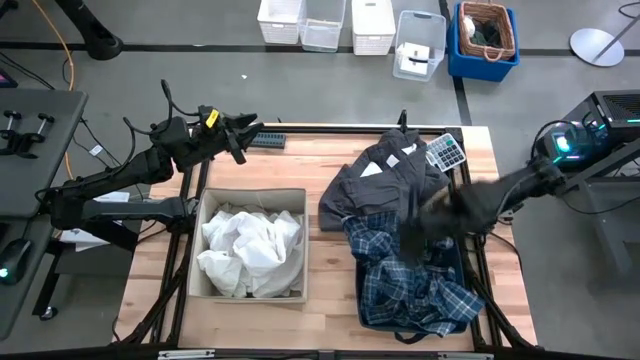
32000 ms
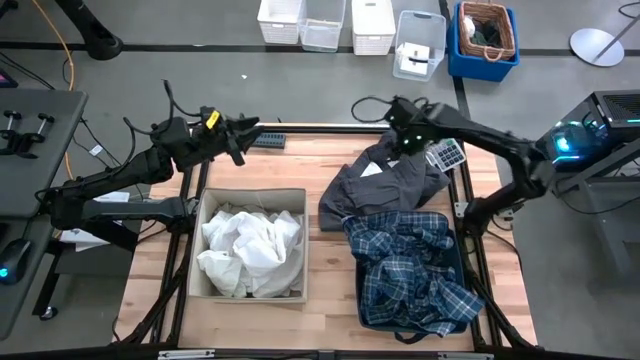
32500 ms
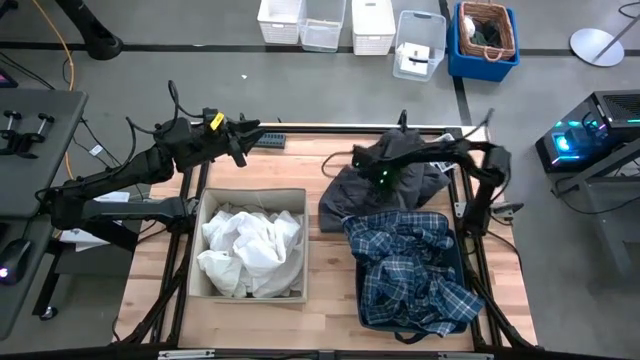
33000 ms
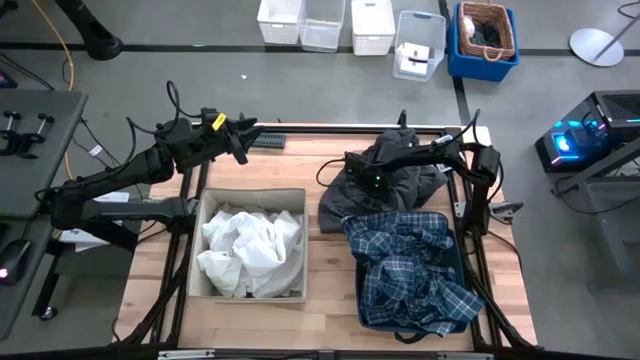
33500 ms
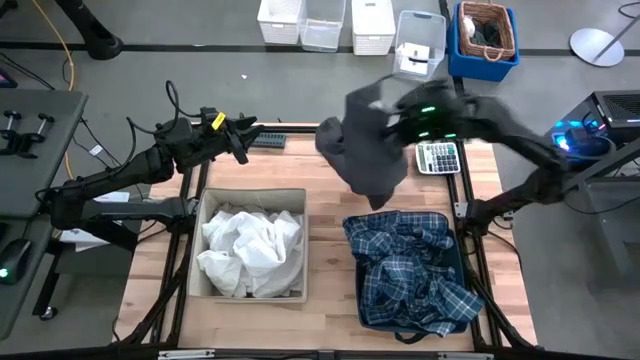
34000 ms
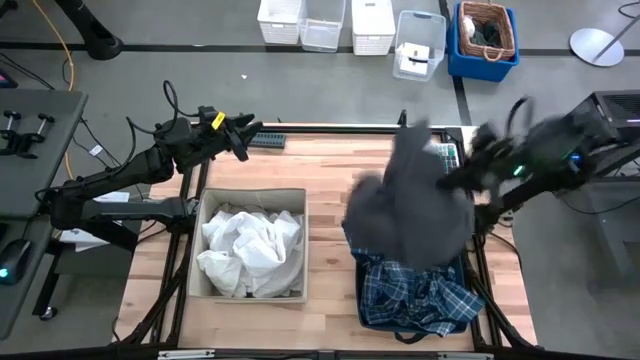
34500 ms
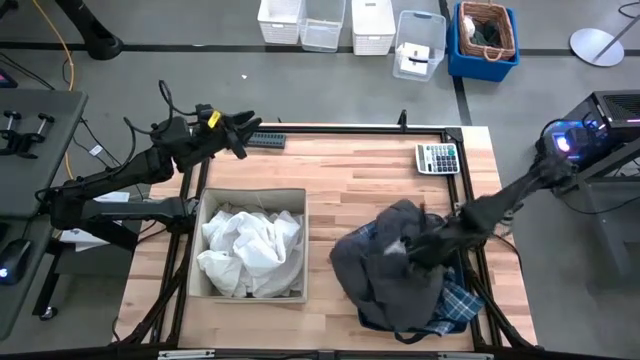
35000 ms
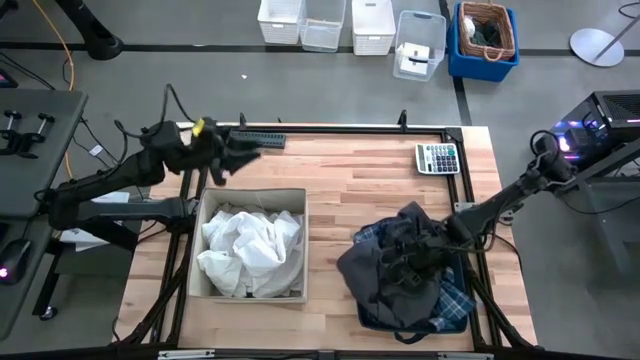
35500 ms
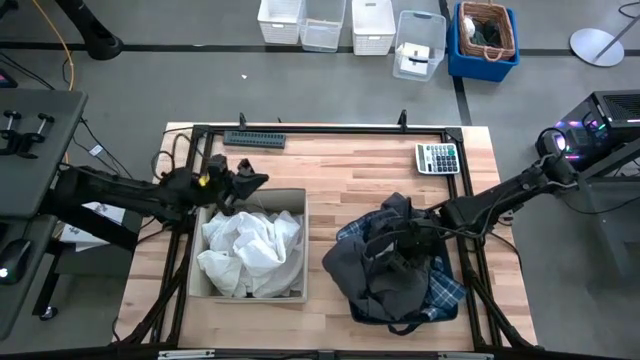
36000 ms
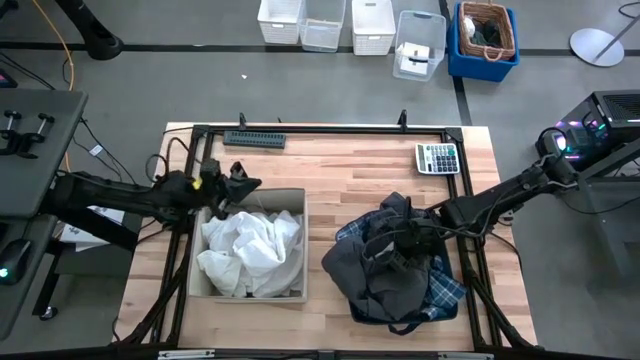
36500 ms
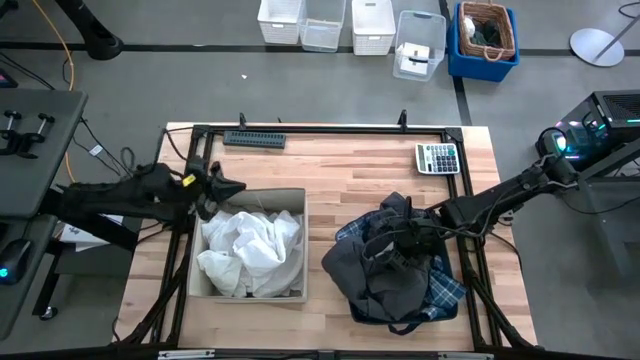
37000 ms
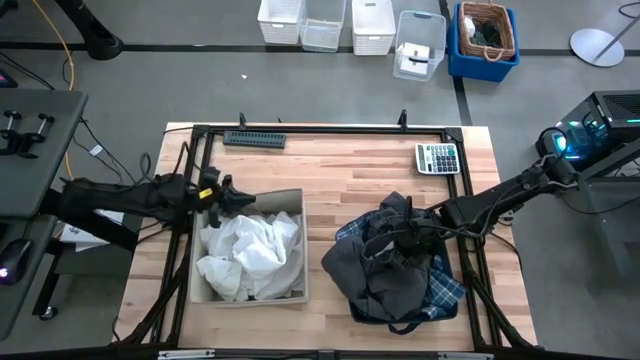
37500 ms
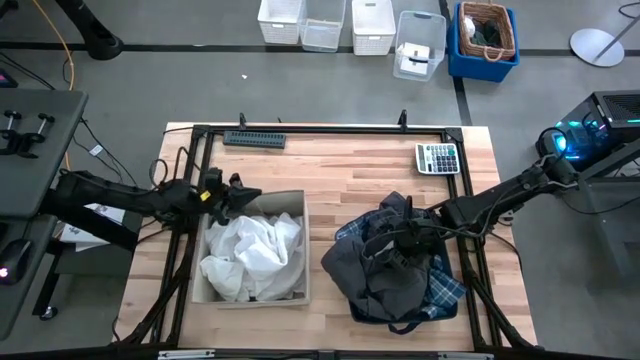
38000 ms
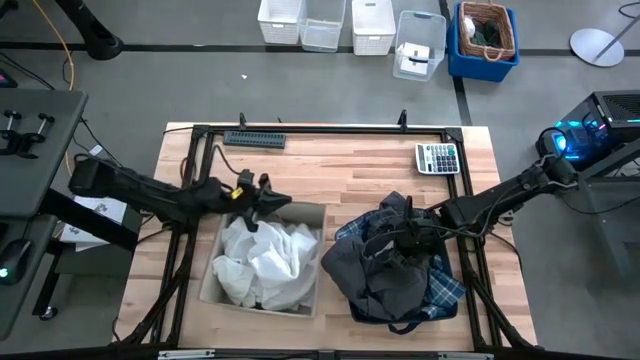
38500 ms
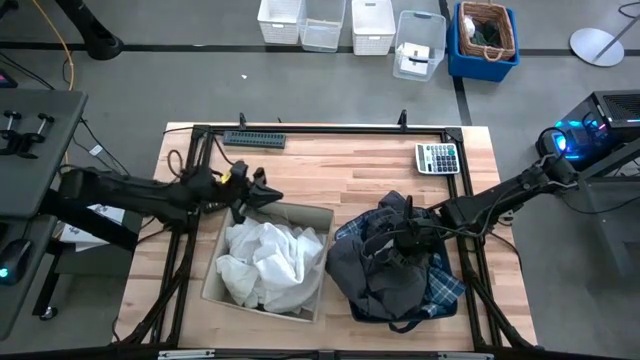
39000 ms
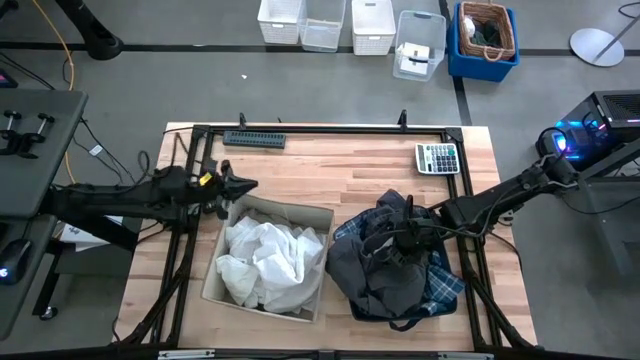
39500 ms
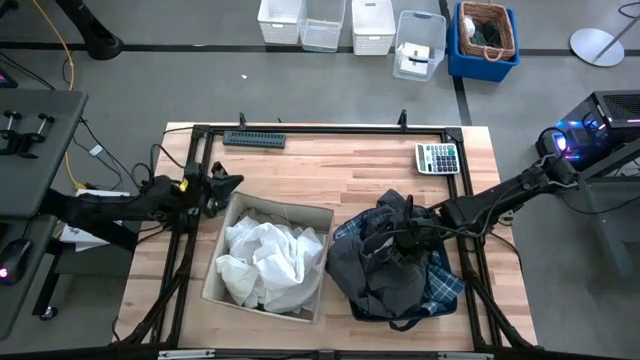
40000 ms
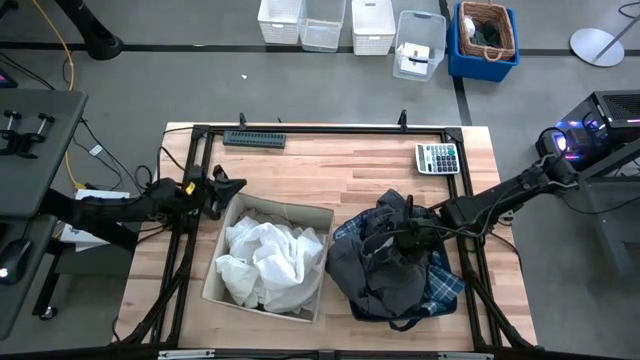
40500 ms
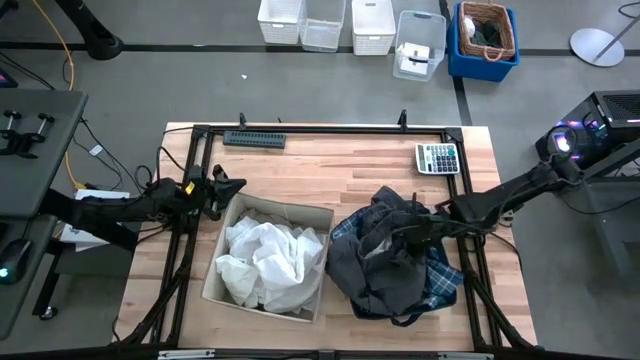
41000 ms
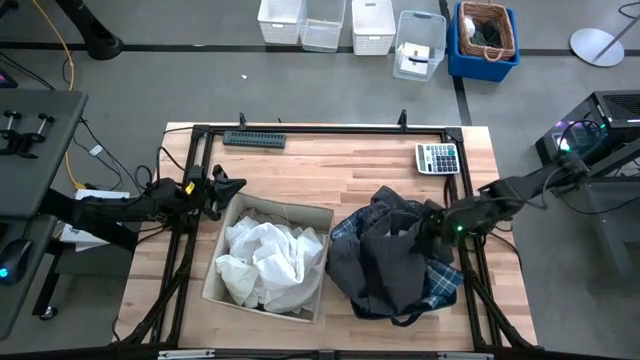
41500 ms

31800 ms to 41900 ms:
Task: Sort clothes
Put the black shorts into the blue laundry bin

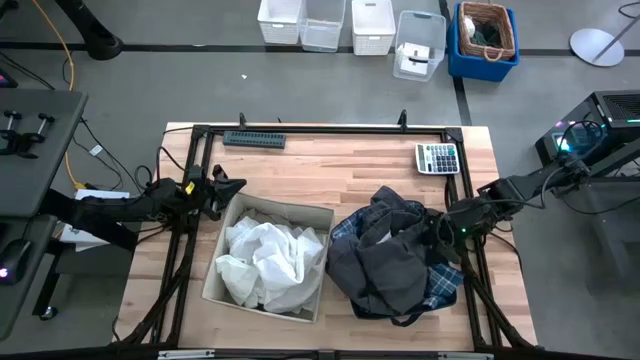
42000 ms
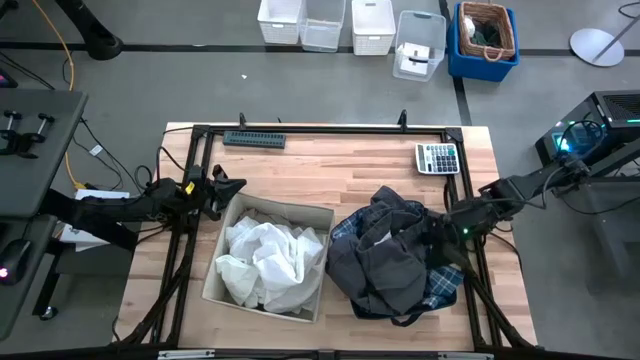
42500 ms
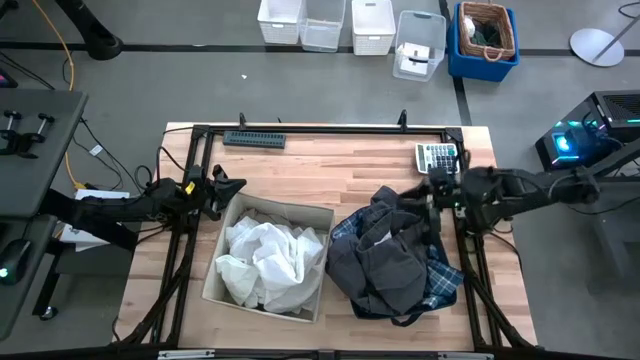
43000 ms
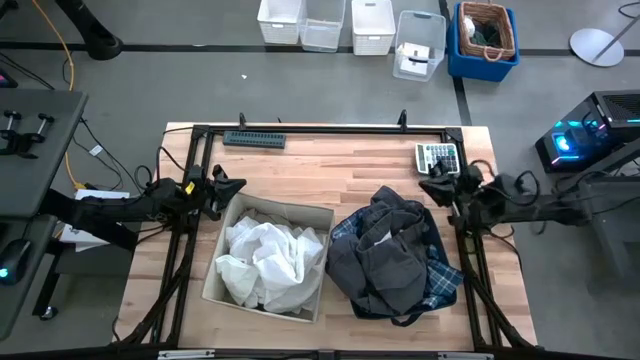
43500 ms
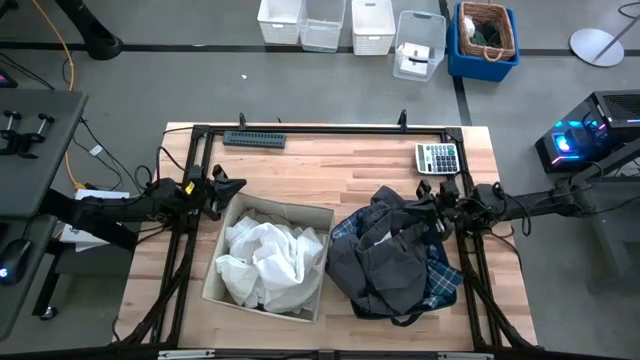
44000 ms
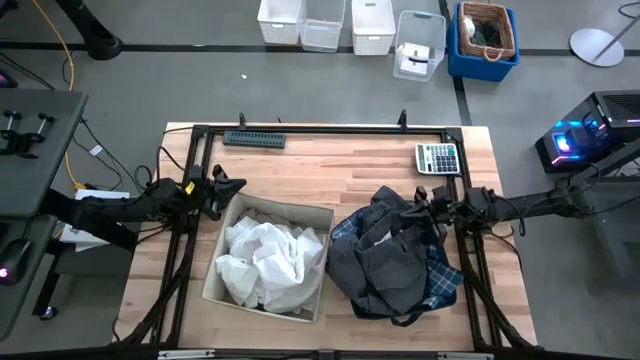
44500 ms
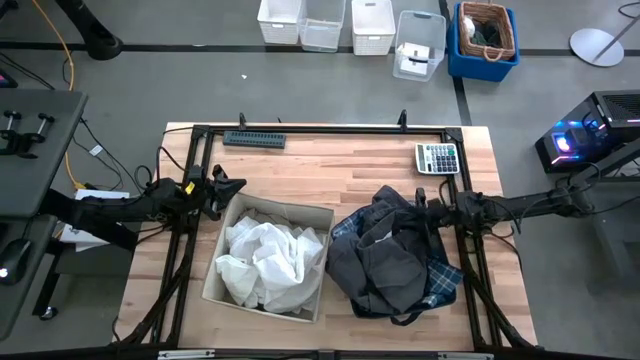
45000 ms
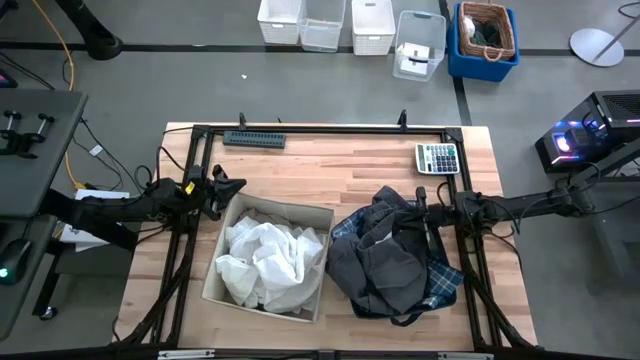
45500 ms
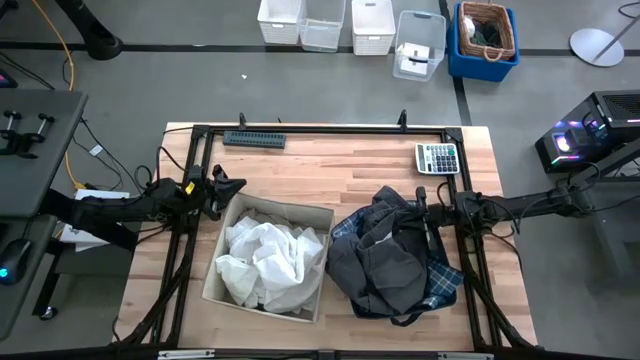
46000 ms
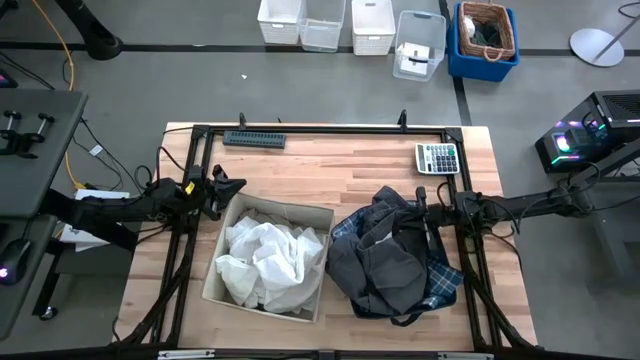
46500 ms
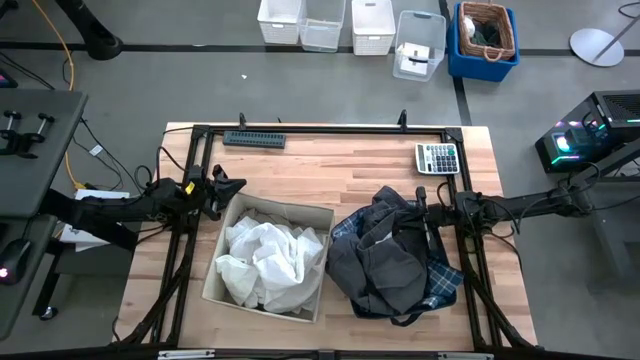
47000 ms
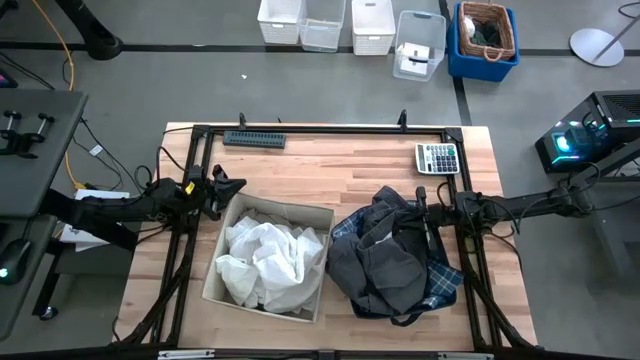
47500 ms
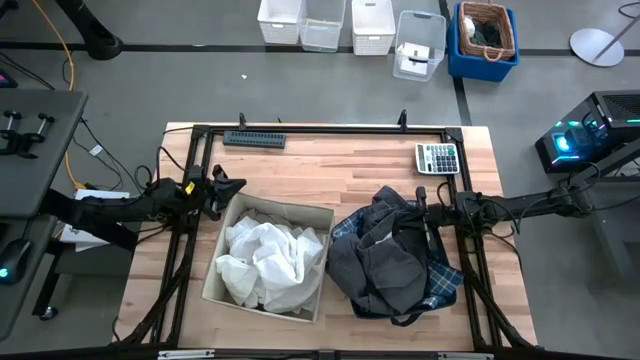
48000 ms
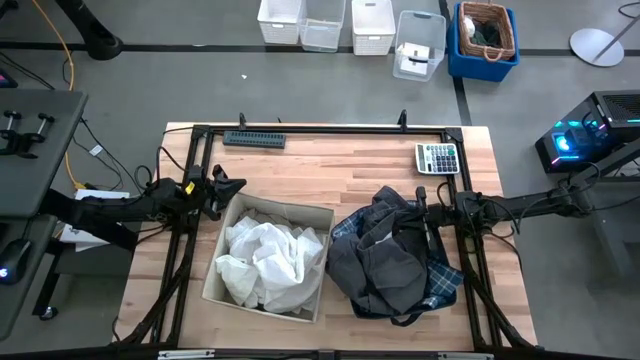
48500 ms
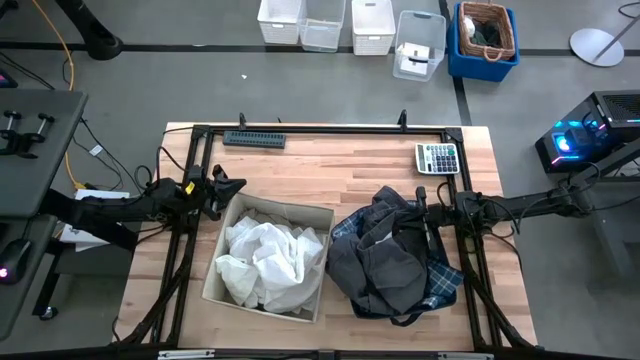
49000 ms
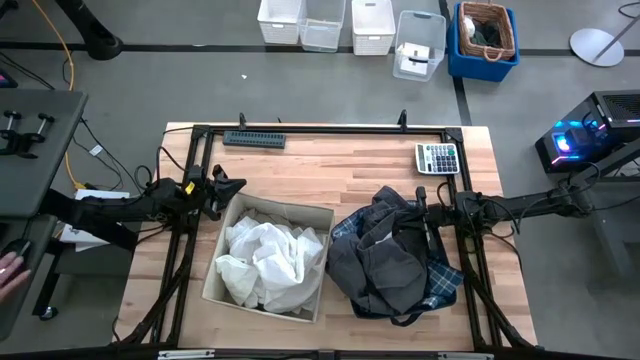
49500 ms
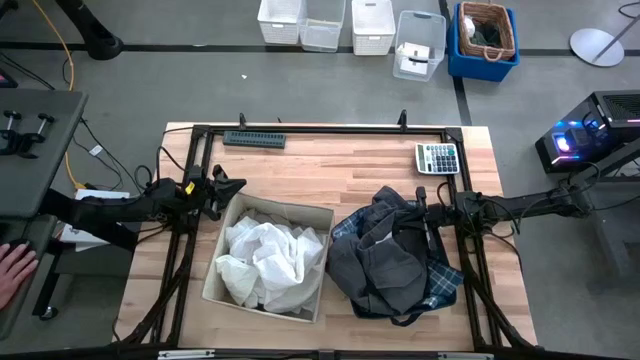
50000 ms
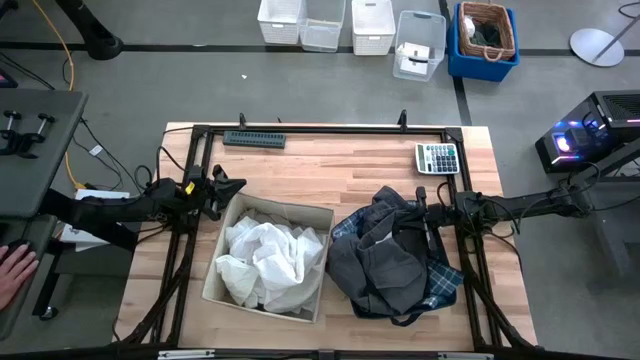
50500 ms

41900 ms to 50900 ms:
Return to Home Position

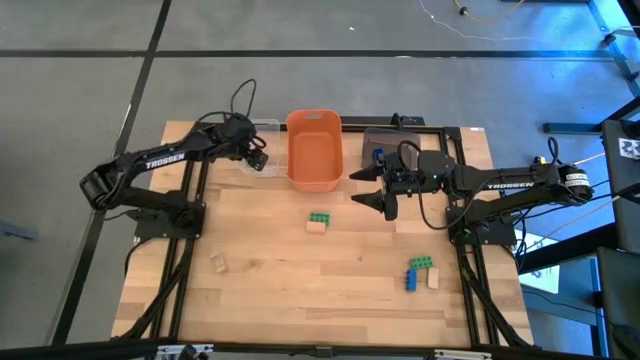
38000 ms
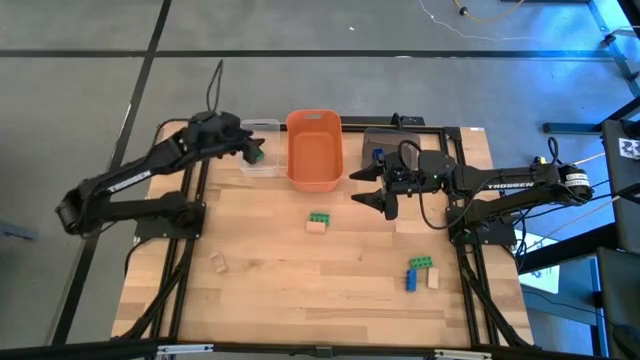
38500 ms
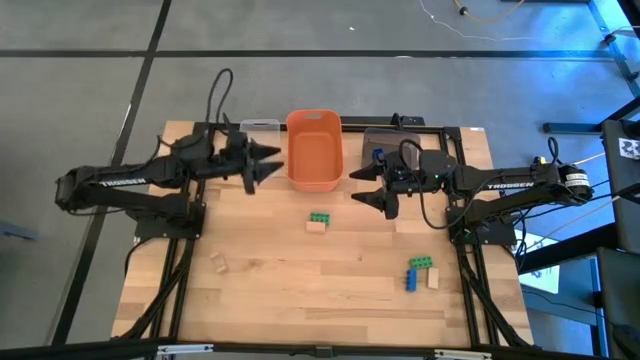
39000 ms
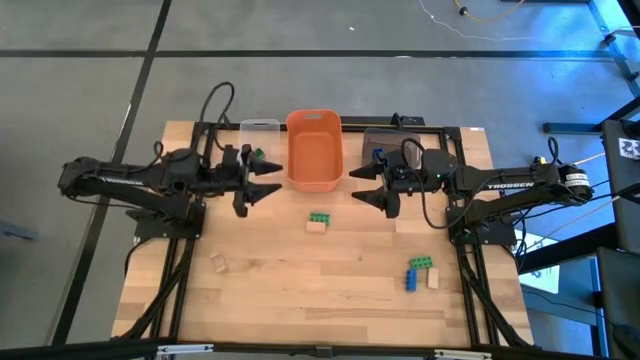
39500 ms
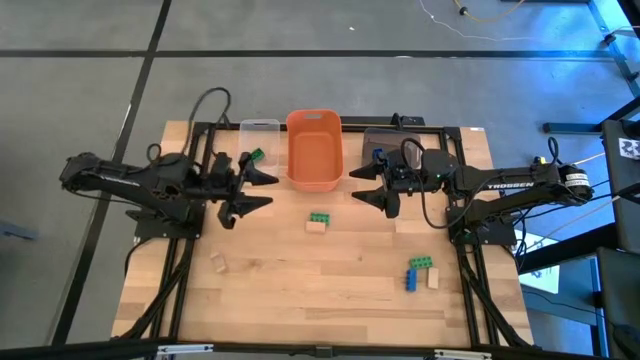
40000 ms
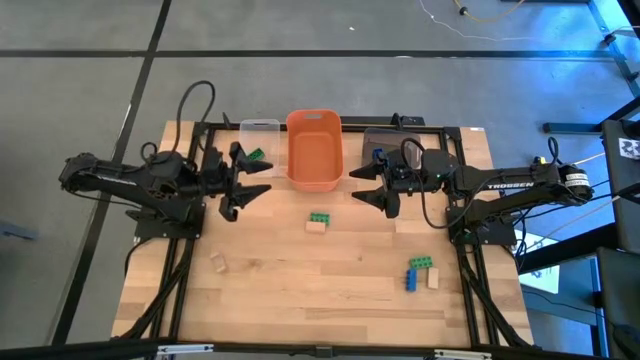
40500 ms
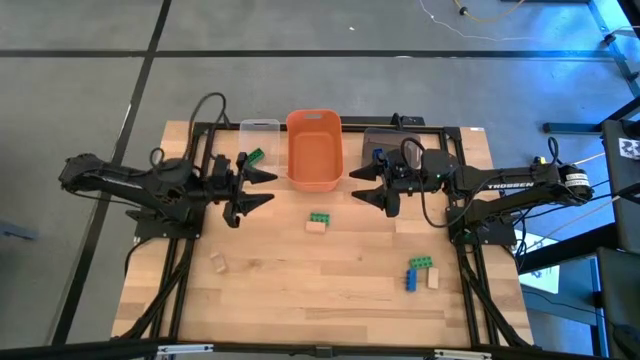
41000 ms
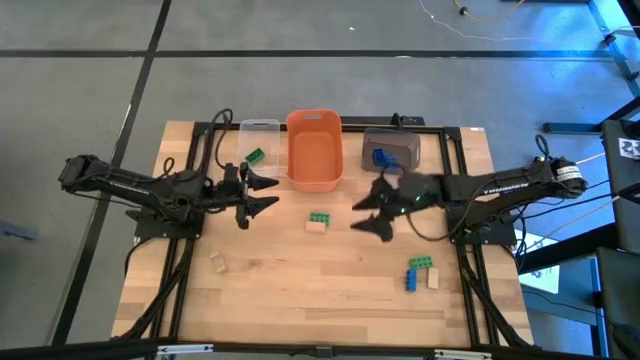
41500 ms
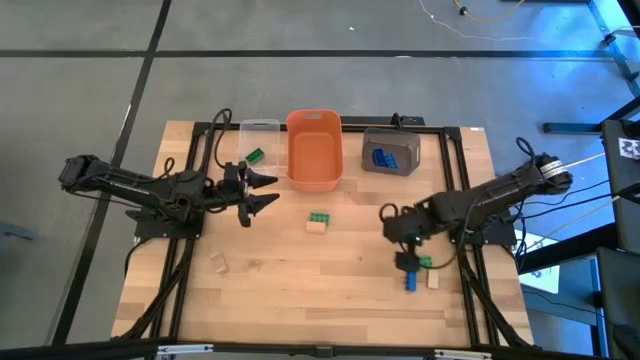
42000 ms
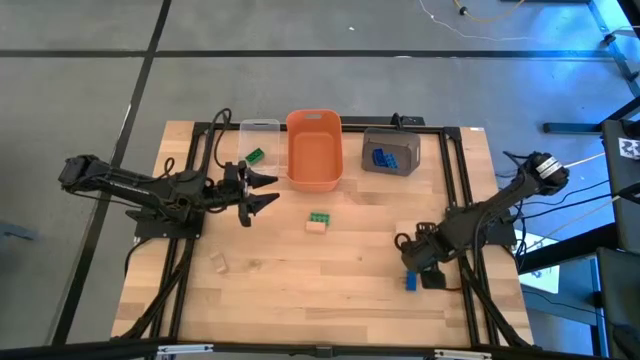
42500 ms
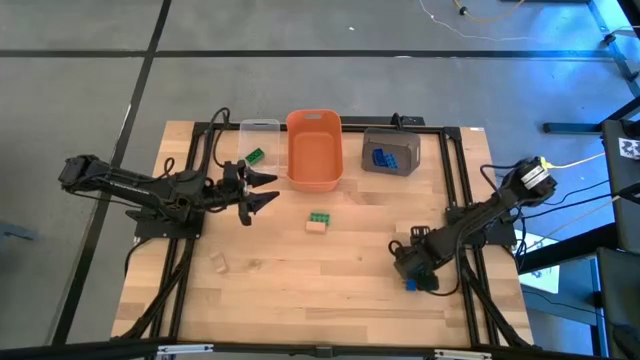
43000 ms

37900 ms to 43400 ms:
Task: Sort & place blocks by color
Put the bottom green game piece into the transparent bin
